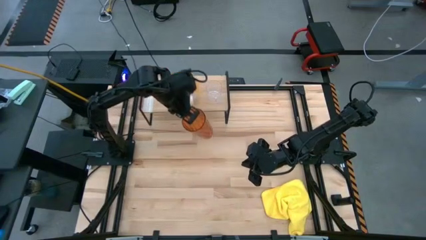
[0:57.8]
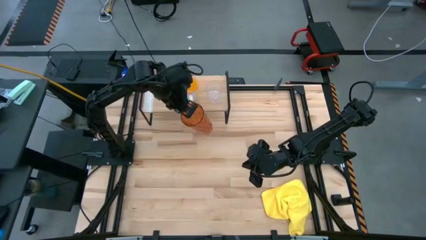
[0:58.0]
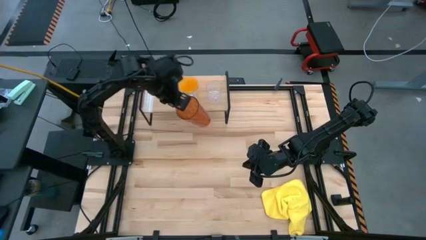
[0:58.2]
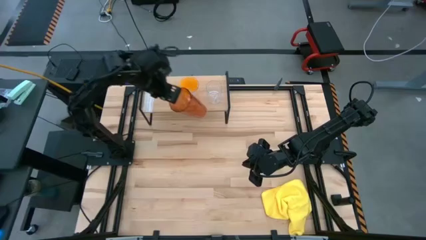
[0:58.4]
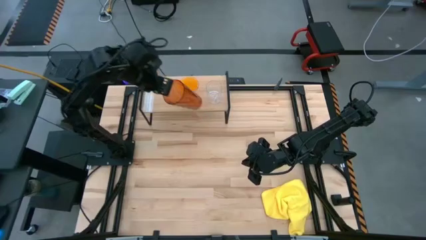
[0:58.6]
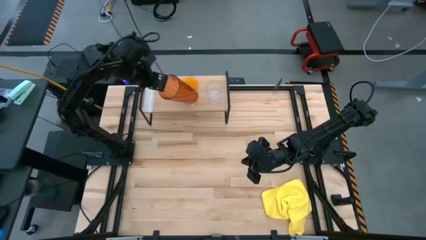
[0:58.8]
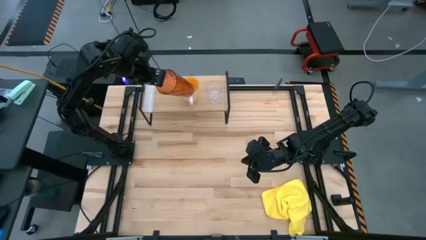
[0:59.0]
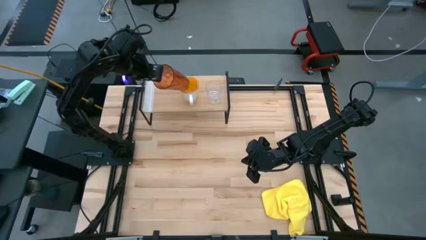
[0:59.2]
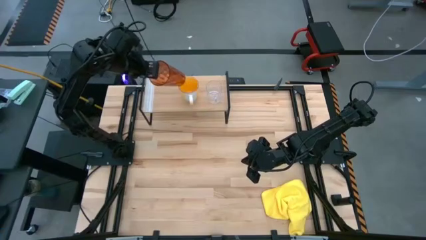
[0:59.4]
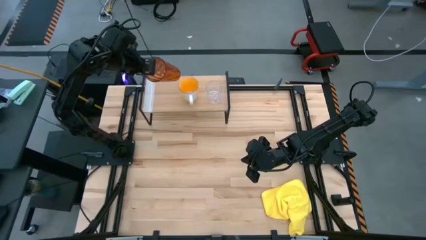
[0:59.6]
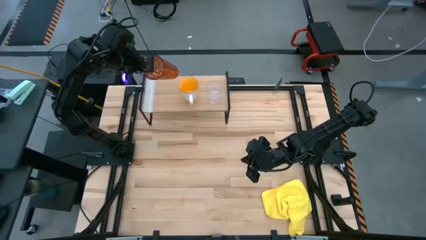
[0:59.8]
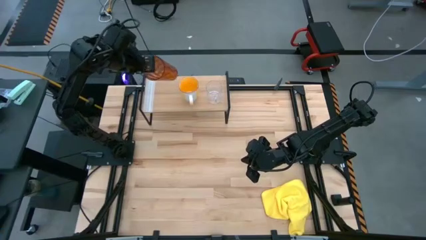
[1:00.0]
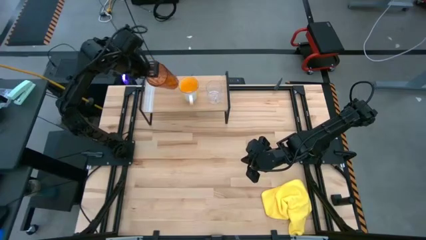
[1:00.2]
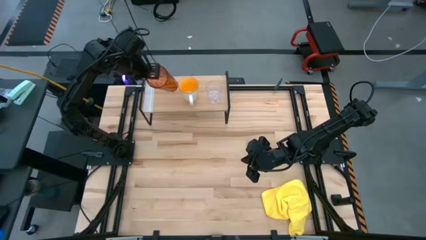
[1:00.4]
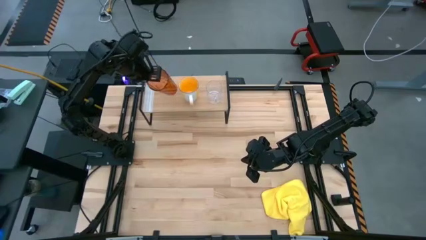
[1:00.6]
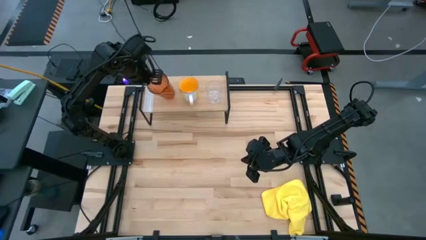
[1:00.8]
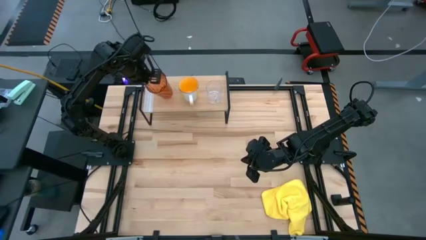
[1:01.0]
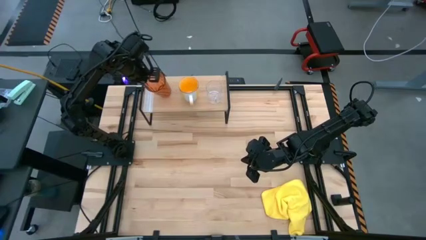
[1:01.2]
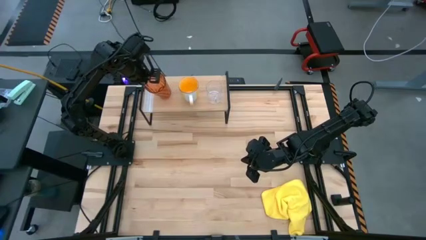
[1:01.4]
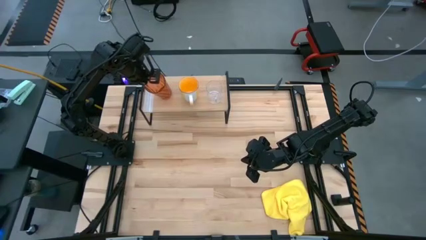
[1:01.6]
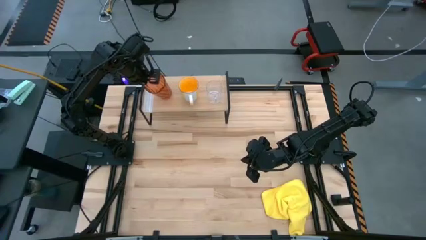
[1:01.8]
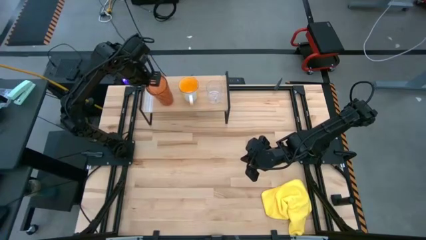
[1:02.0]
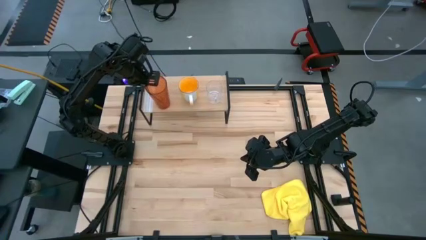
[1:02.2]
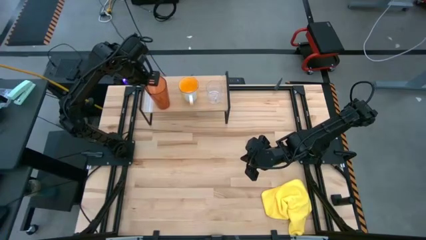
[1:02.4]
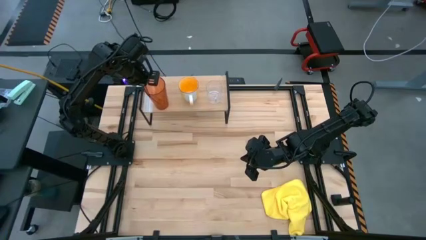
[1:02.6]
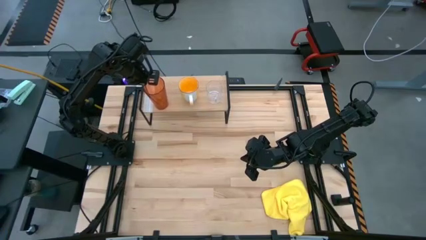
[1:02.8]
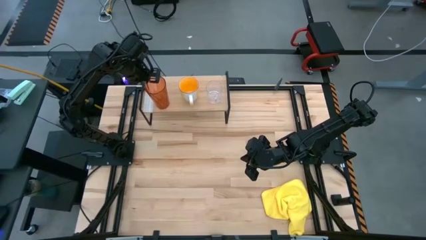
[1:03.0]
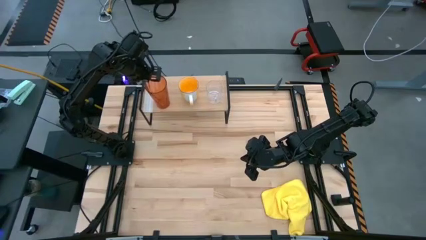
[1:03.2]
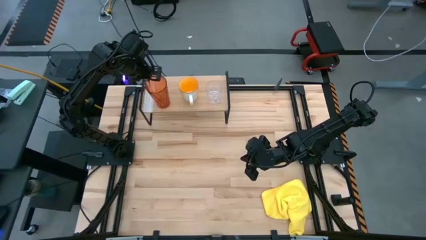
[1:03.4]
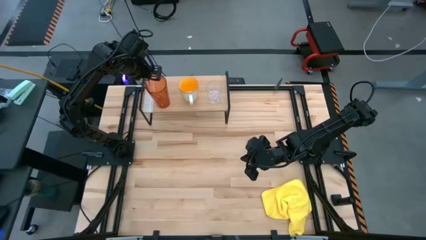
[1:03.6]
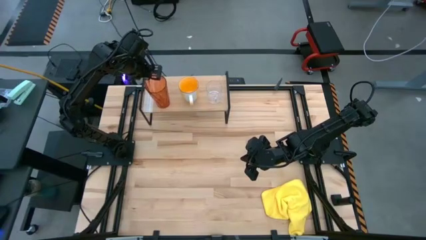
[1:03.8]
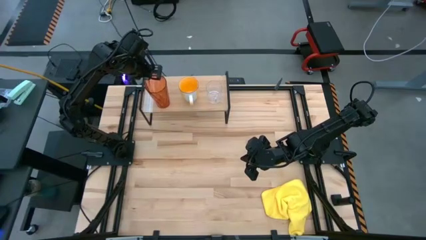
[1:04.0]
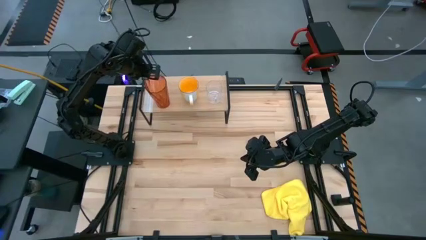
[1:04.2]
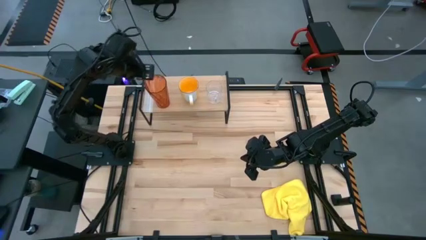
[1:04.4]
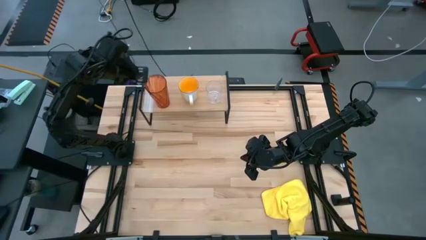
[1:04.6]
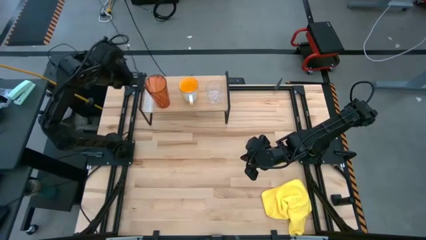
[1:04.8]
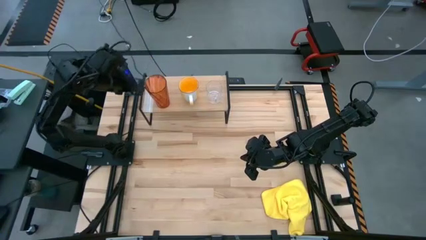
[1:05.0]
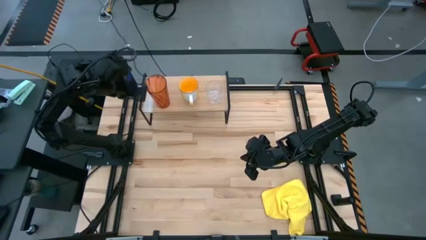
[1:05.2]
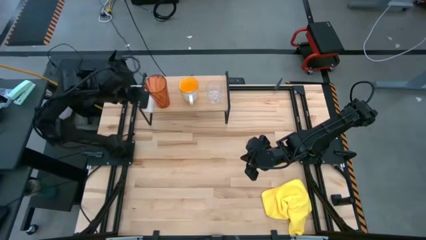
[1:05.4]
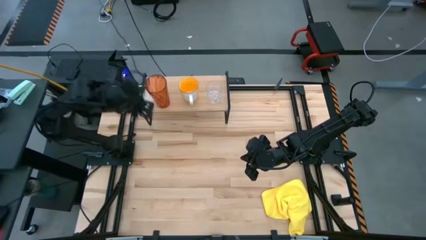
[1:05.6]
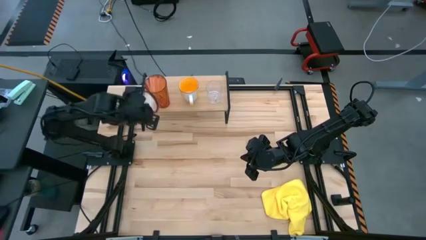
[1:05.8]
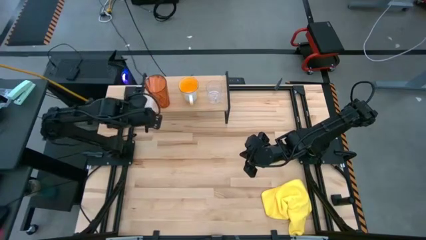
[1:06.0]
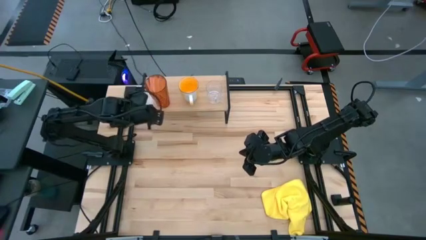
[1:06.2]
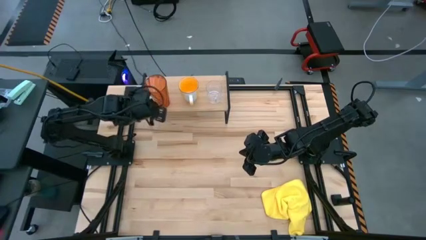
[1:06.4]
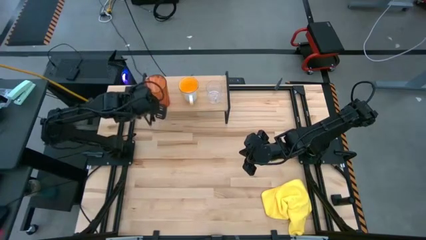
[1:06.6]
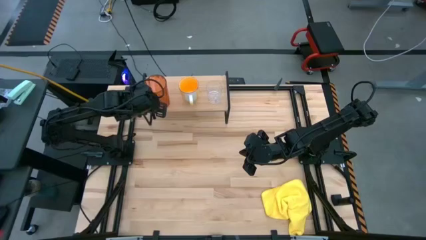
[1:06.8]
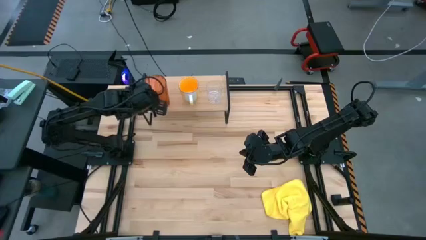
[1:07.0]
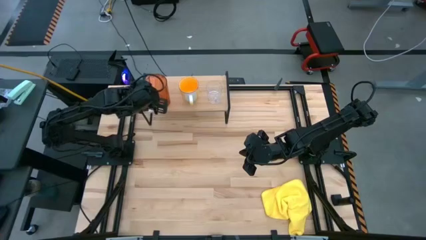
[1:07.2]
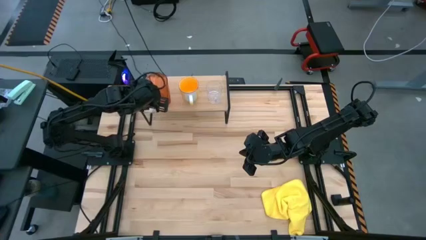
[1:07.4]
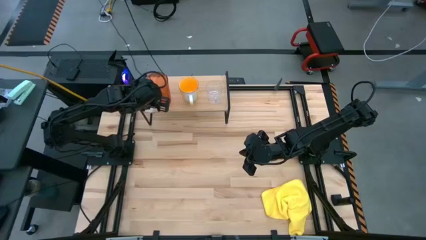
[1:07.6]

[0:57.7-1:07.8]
Task: Stack small to large cups/mugs on shelf
Put the orange cup on the shelf

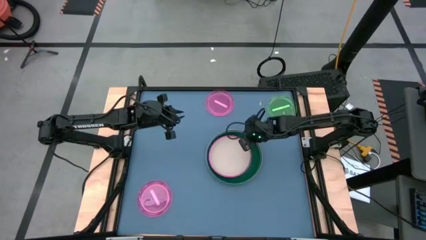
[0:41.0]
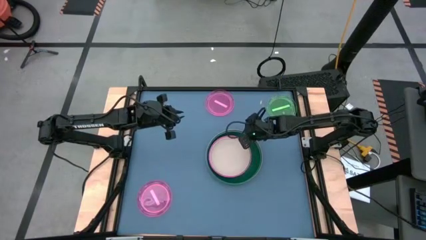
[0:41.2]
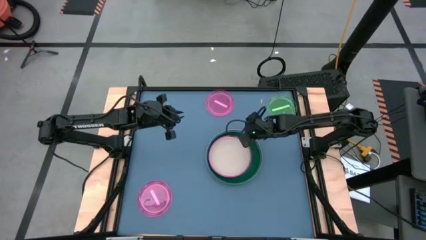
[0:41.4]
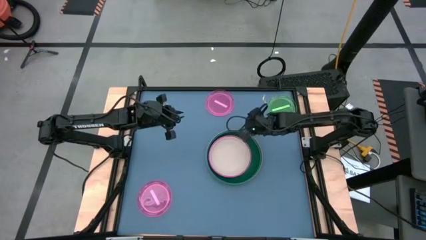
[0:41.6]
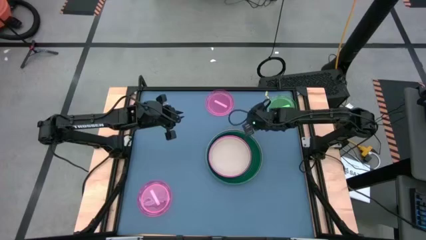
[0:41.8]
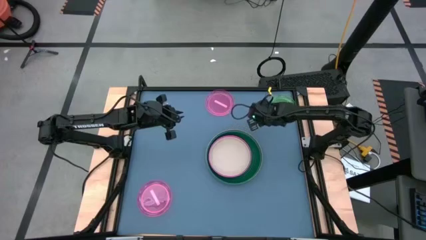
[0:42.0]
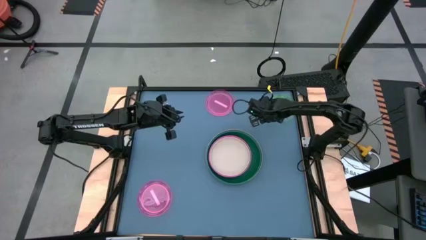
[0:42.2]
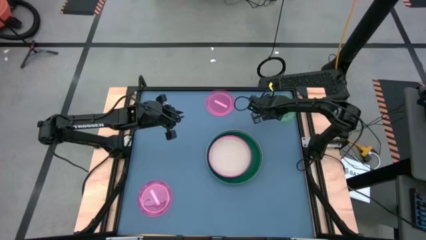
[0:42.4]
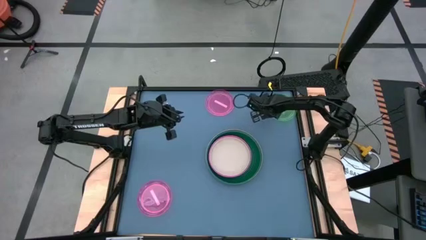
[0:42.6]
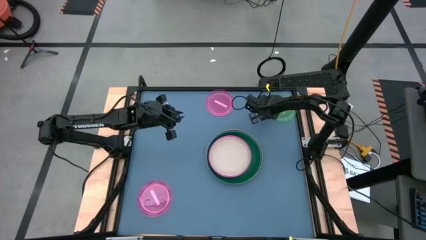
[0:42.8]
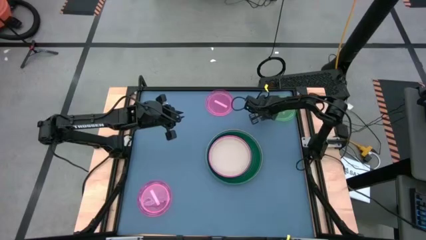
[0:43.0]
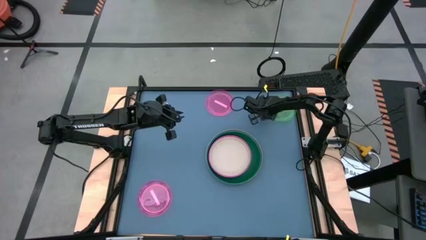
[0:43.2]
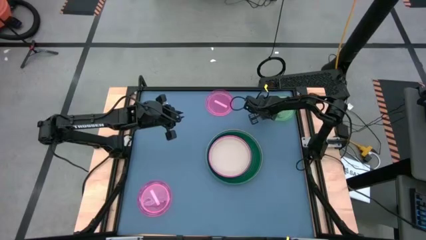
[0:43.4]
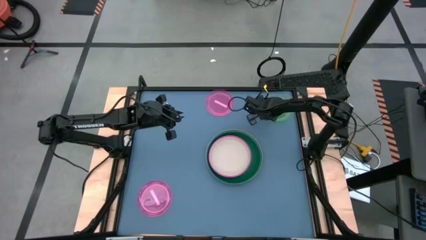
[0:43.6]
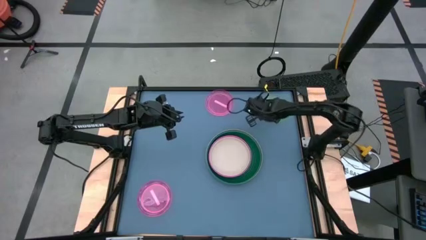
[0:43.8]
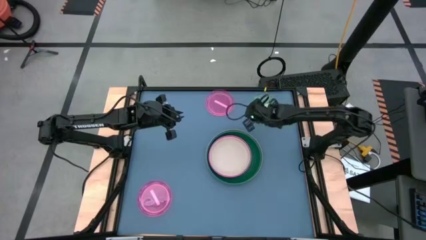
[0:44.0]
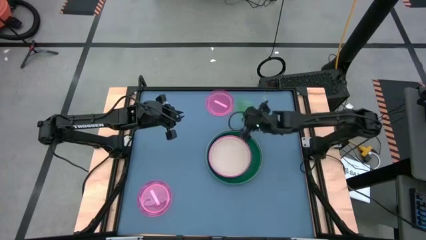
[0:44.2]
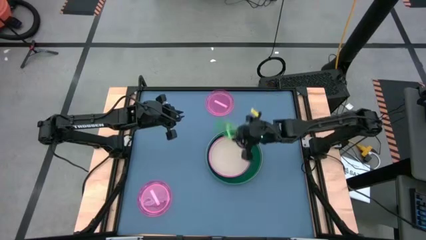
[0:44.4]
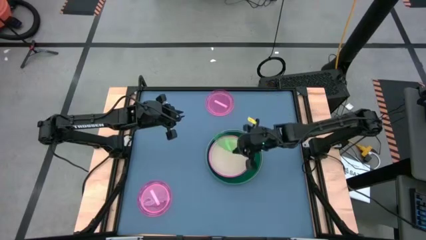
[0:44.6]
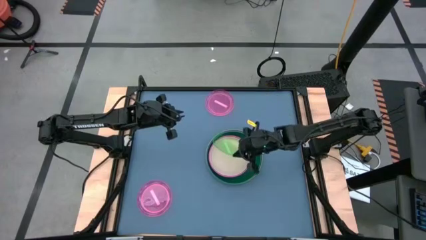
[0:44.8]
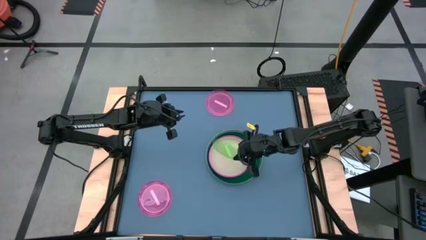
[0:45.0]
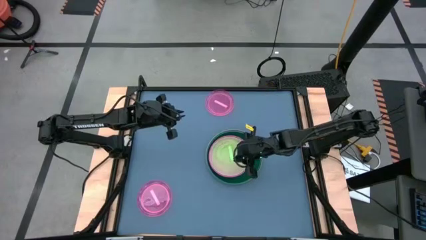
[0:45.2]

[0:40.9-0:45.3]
Task: Stack plastic plates
Stack the top light green plate on top of the white plate
